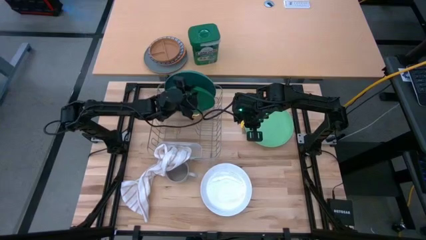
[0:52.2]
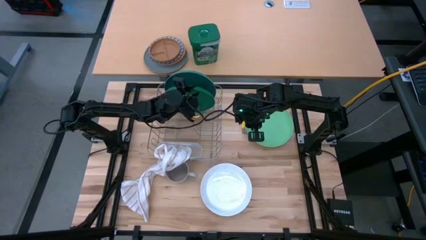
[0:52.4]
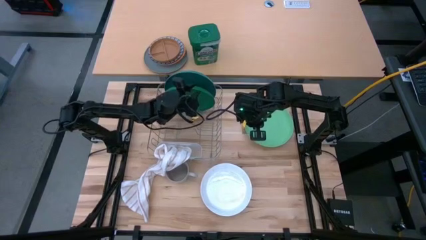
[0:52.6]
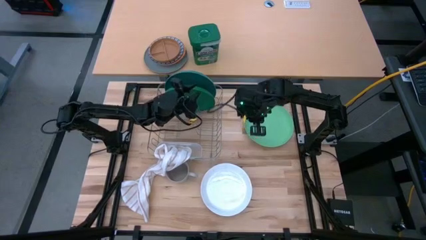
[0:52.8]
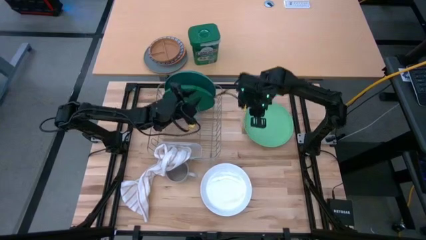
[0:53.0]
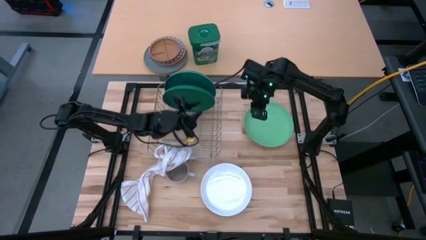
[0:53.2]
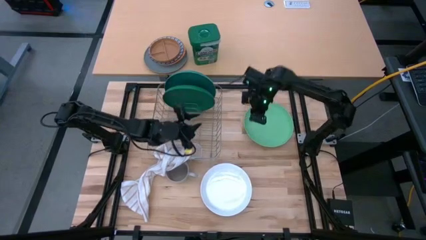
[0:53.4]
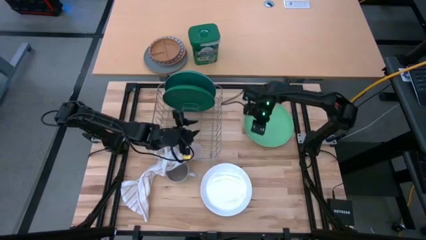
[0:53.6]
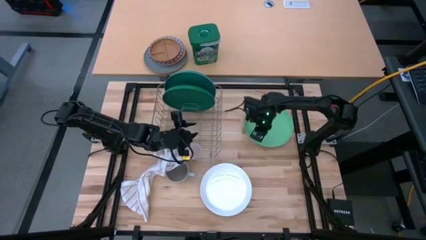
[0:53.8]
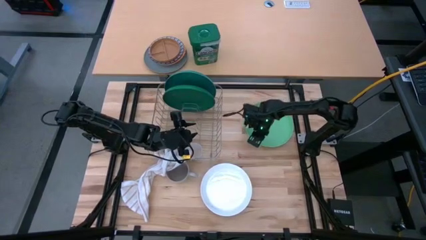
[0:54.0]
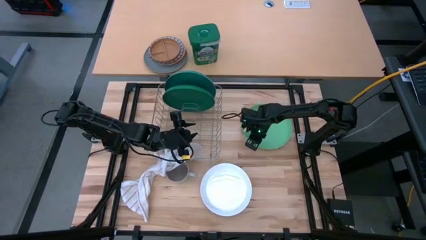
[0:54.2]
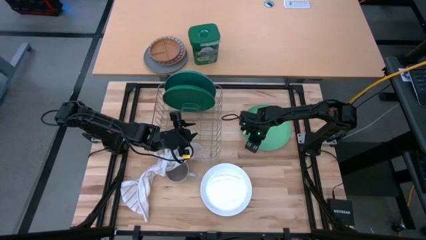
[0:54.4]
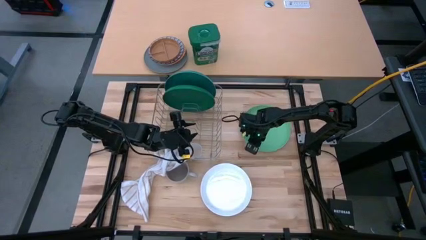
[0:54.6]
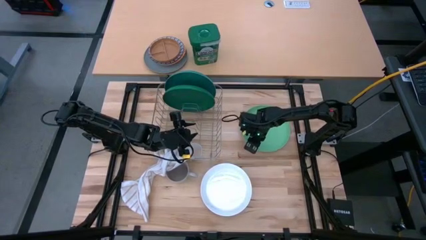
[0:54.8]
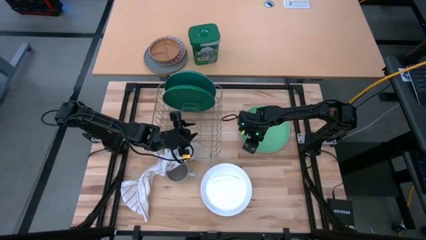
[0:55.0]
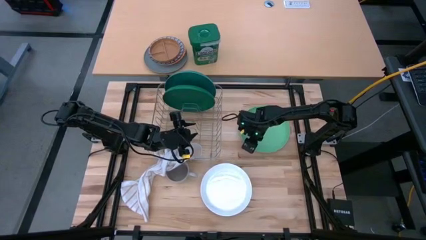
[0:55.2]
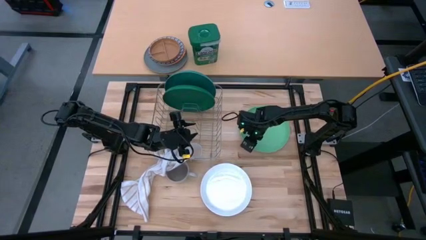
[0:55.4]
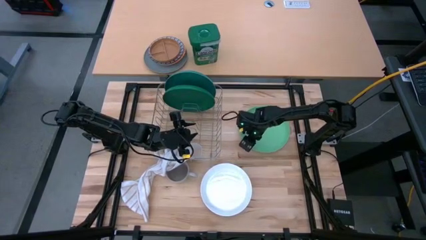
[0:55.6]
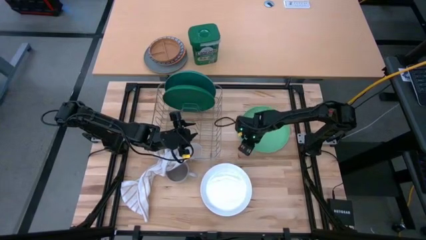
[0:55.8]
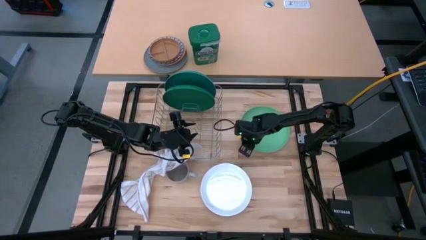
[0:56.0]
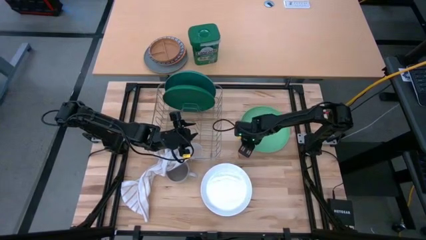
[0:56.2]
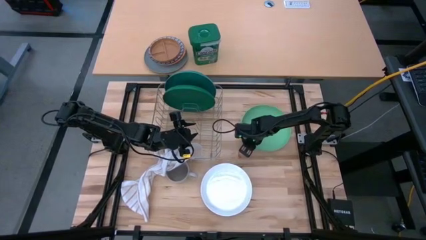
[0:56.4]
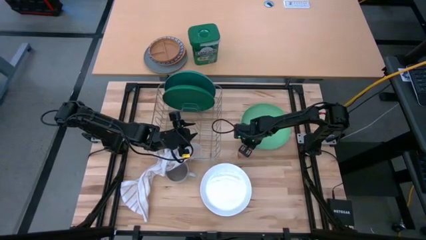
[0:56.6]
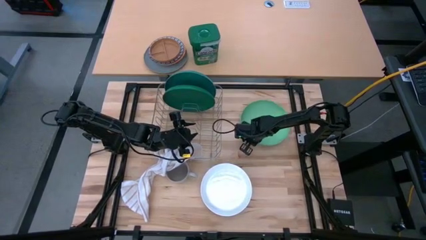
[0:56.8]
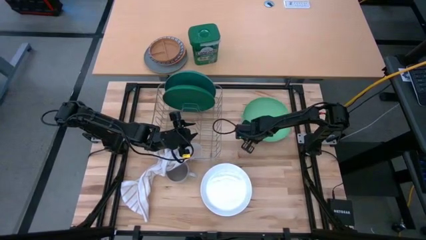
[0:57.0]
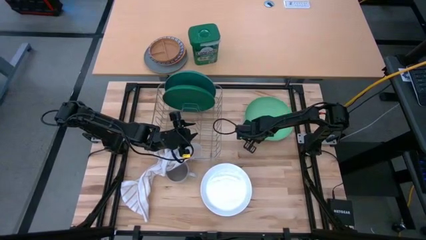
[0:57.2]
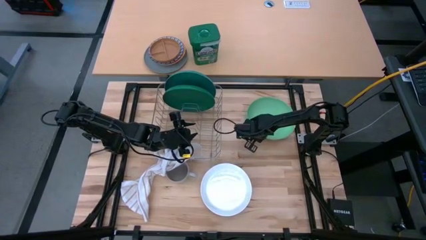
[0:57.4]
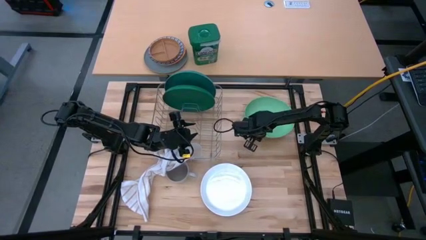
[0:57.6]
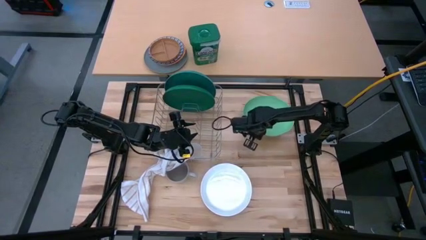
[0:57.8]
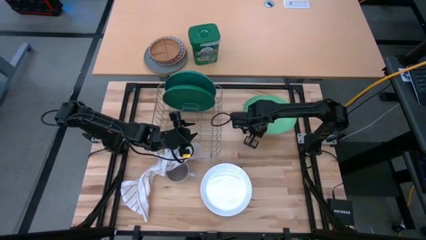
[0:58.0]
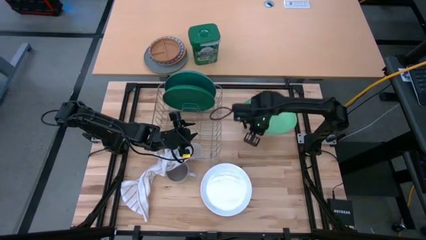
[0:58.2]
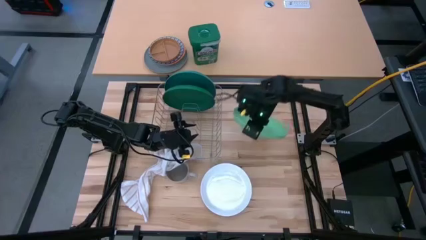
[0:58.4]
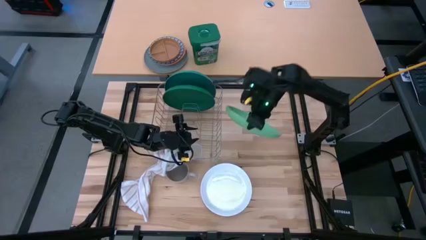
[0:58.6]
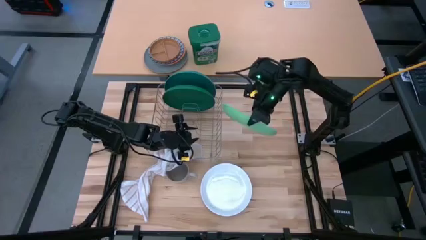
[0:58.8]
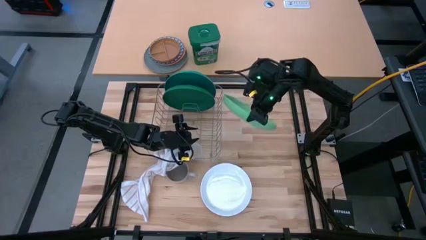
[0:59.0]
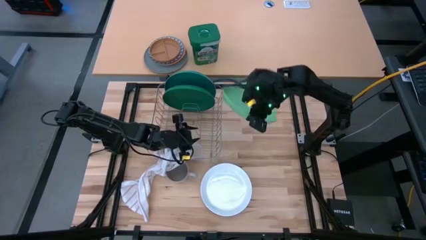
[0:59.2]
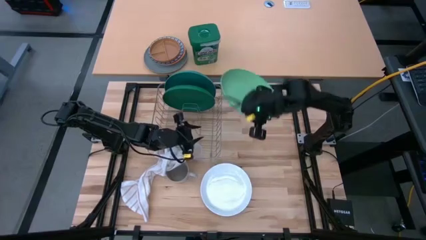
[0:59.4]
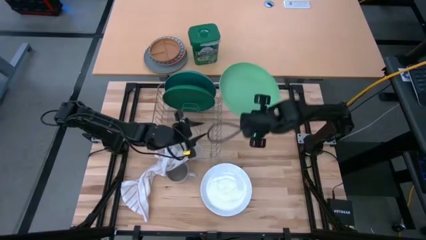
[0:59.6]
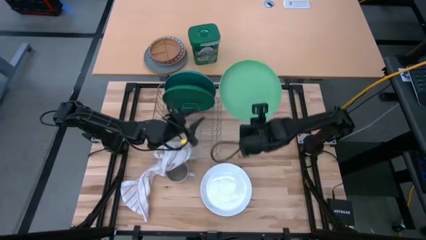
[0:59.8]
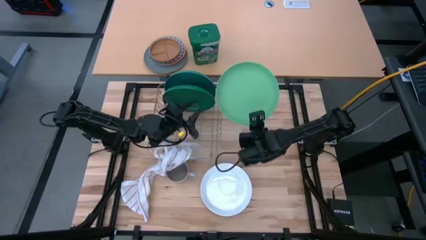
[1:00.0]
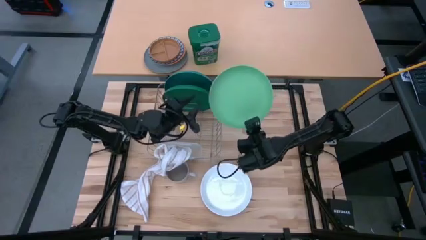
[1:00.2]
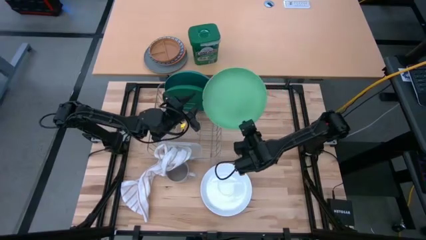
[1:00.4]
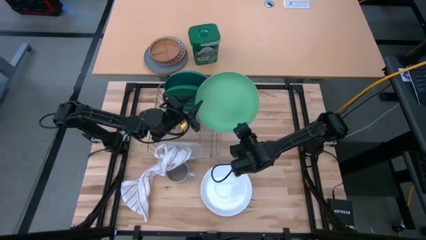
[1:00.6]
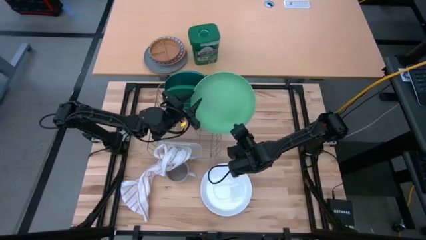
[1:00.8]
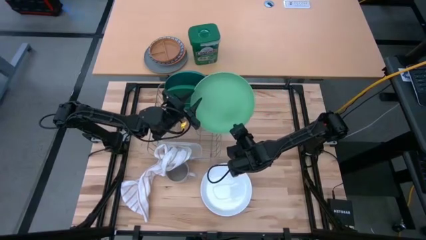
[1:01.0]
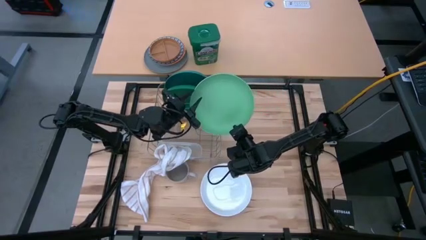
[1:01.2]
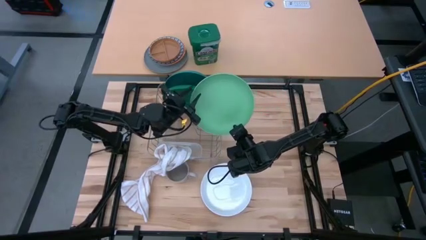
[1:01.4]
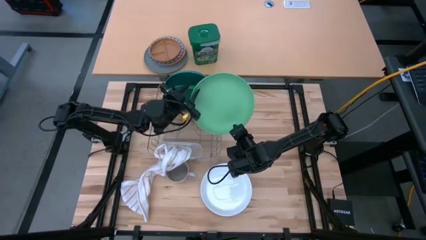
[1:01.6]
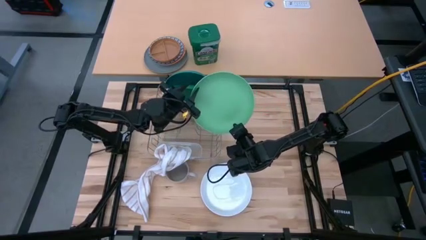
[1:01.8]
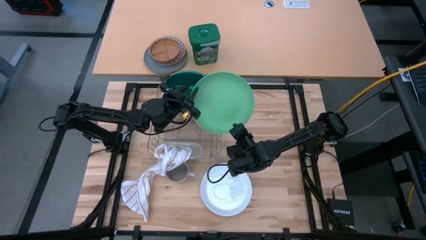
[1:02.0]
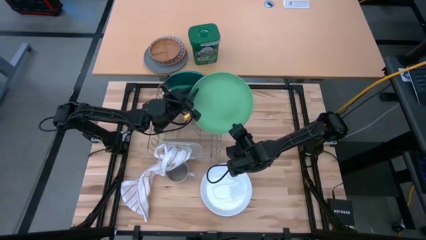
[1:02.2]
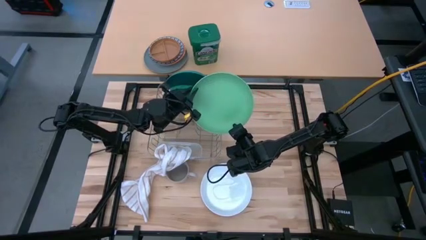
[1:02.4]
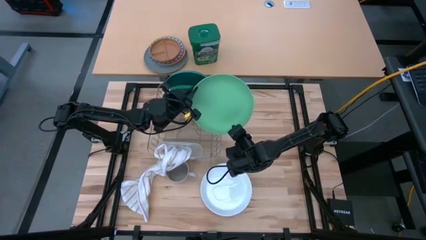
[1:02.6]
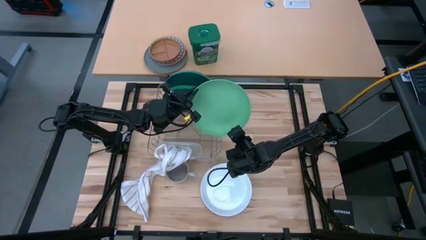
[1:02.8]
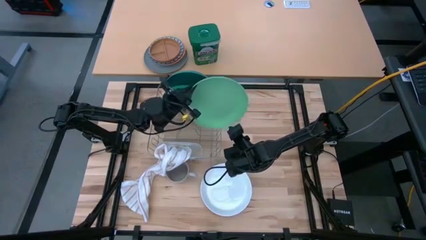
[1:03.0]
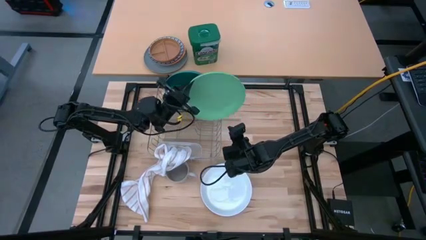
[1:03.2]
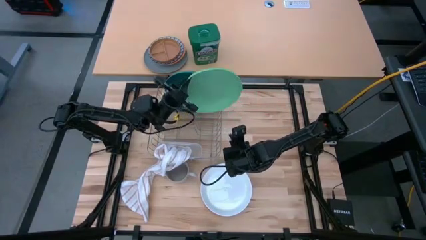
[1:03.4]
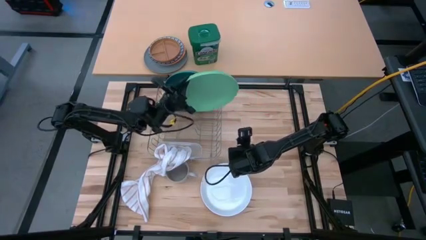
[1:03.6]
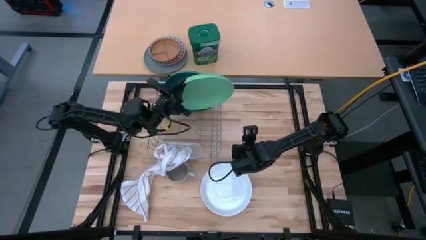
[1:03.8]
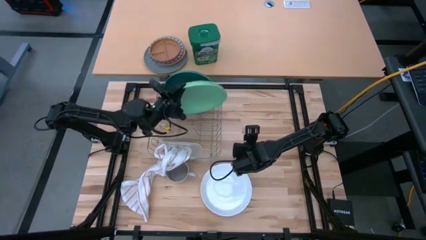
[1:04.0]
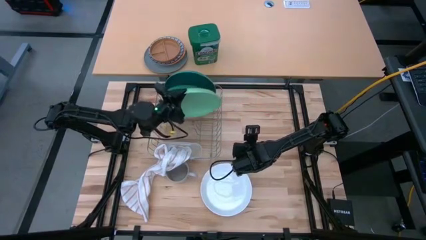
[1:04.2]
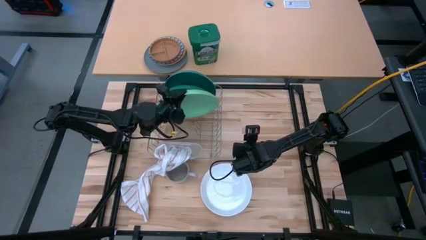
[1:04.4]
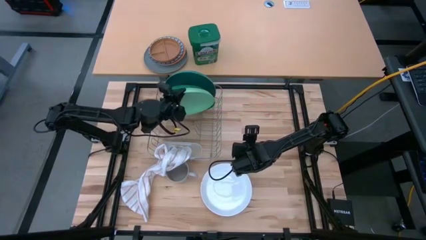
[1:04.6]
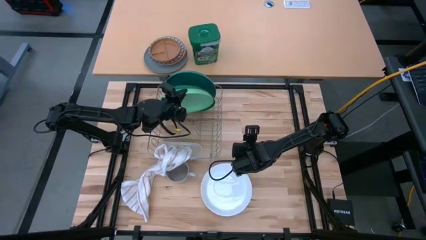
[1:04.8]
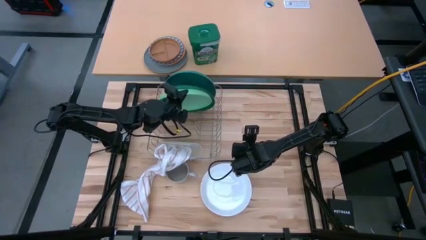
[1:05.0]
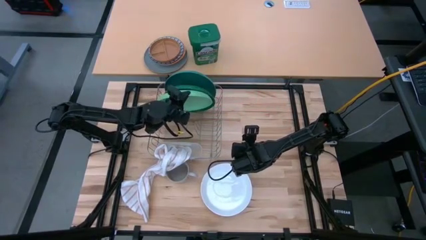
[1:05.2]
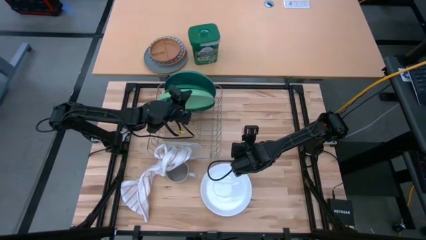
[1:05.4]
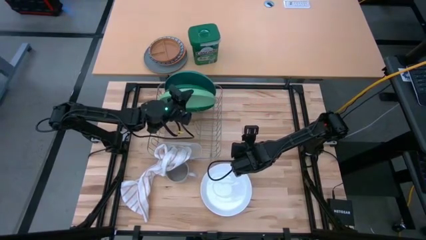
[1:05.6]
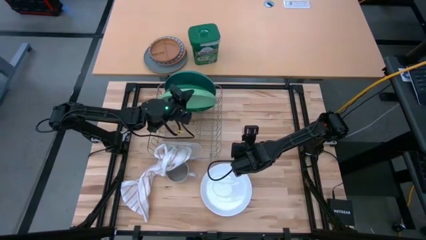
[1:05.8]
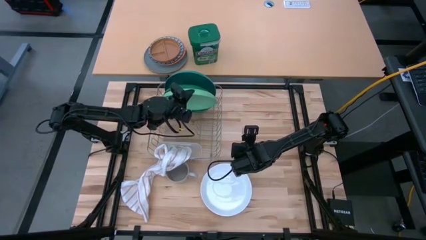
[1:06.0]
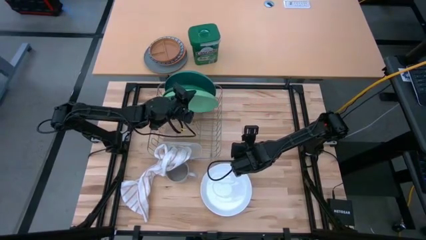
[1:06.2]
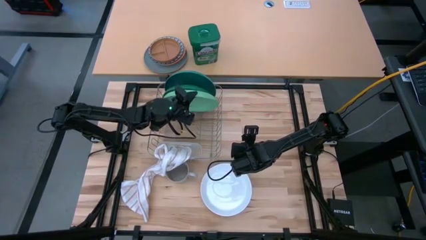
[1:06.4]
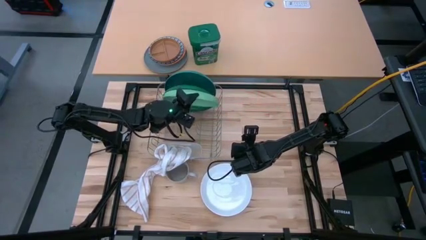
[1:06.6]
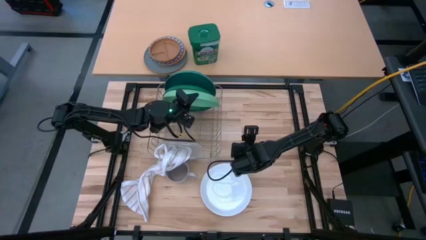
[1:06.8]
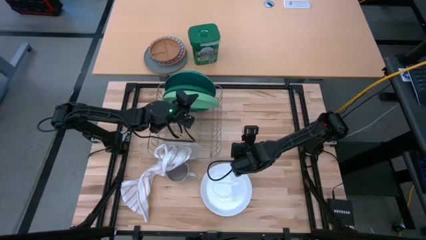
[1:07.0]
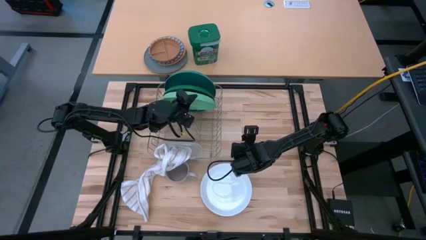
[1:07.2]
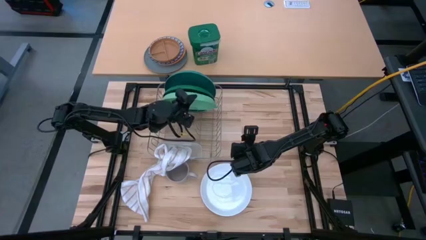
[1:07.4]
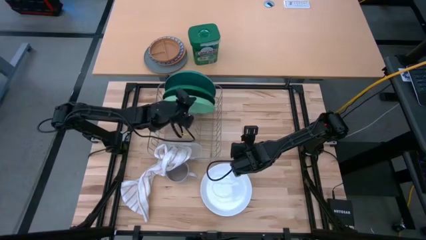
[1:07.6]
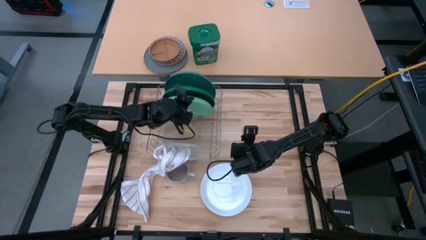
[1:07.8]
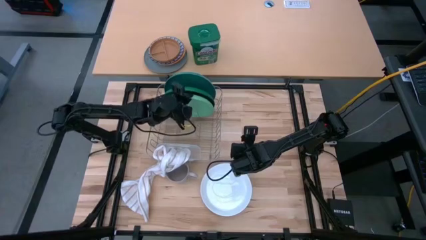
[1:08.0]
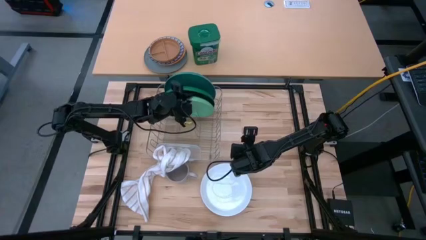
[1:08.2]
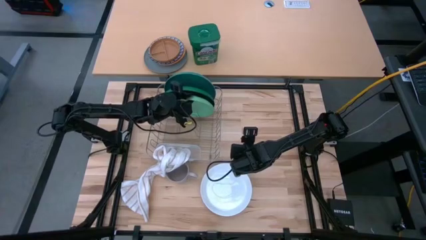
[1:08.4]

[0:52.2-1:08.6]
Task: Sort dishes
Put the light green plate into the gray dish rack
